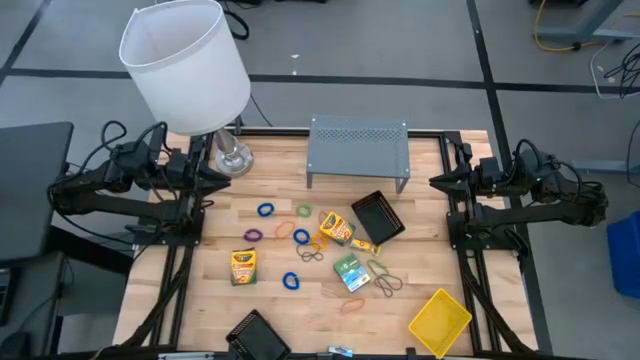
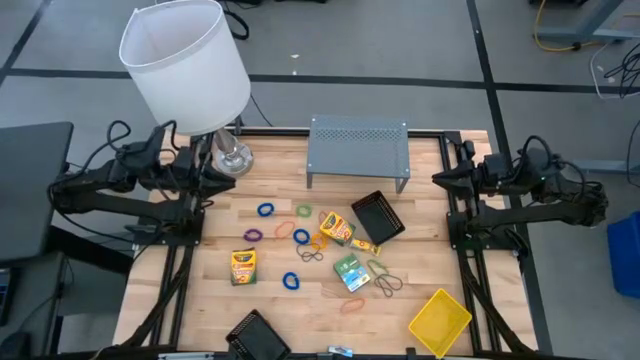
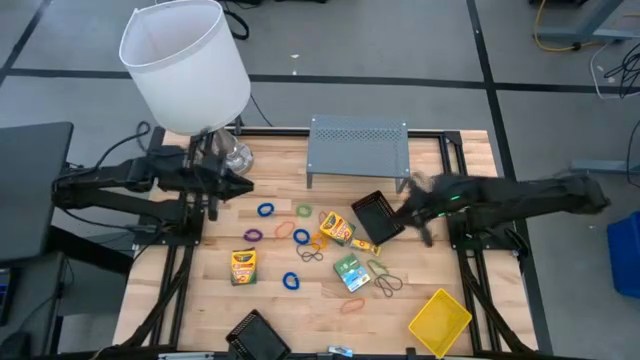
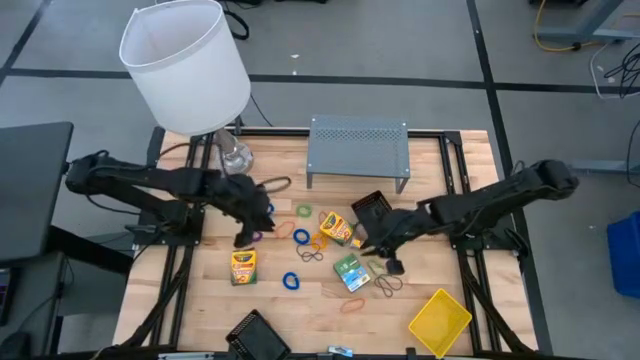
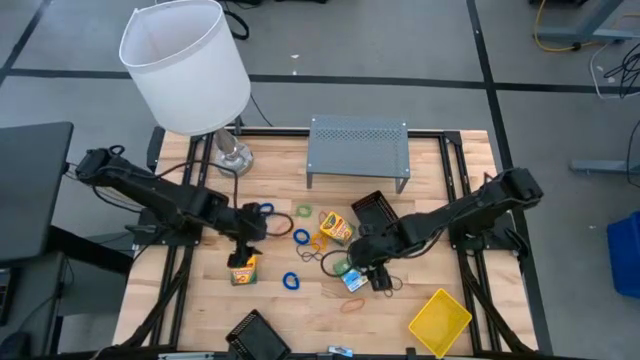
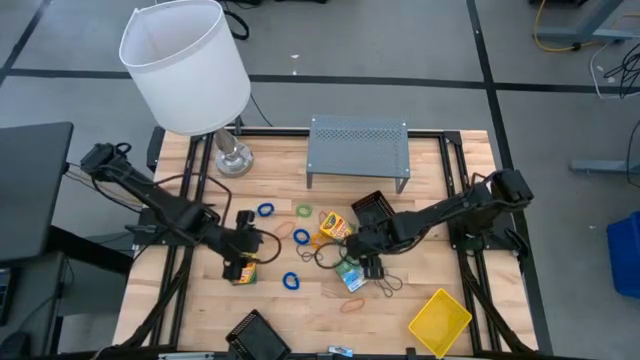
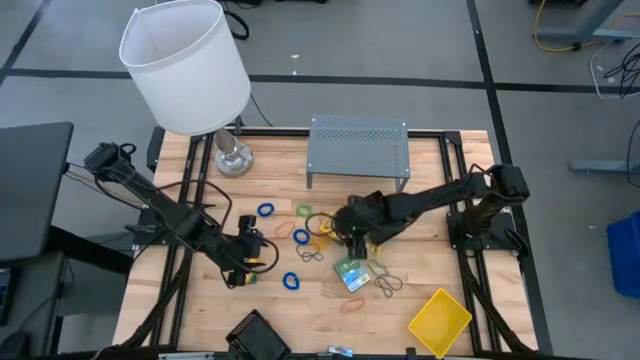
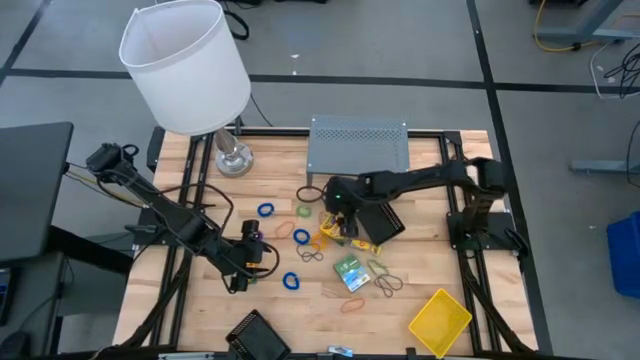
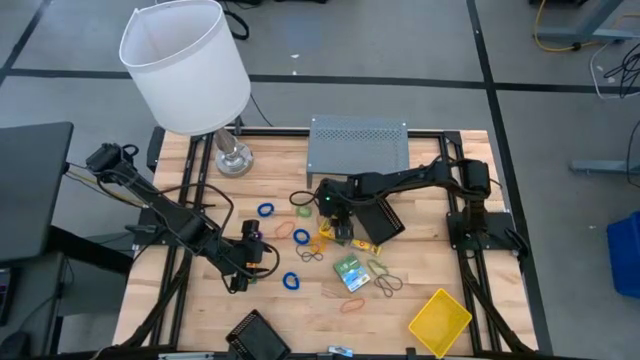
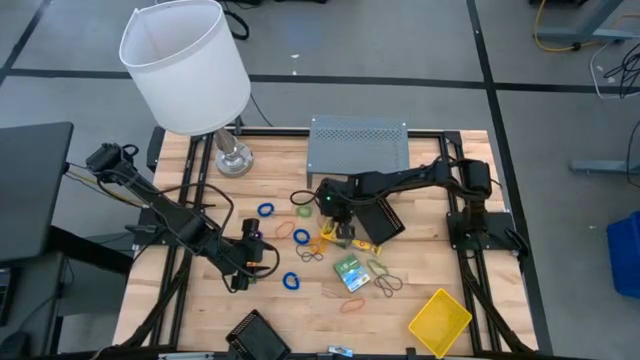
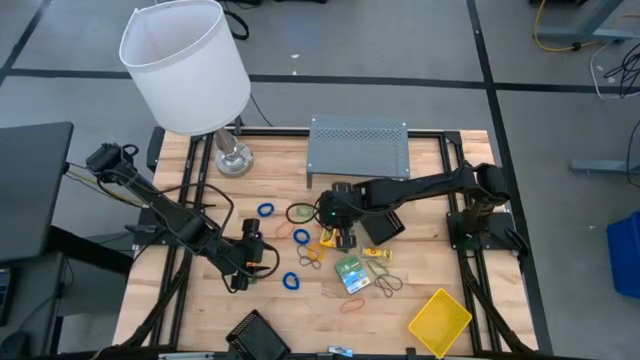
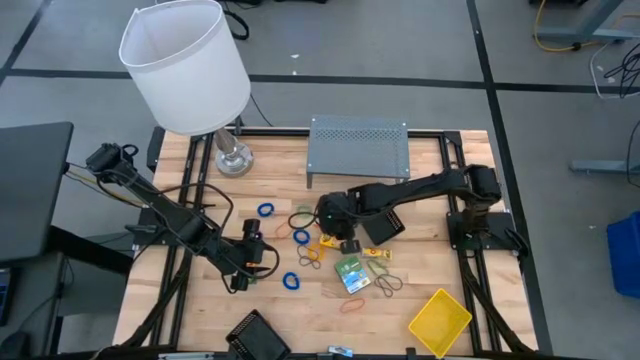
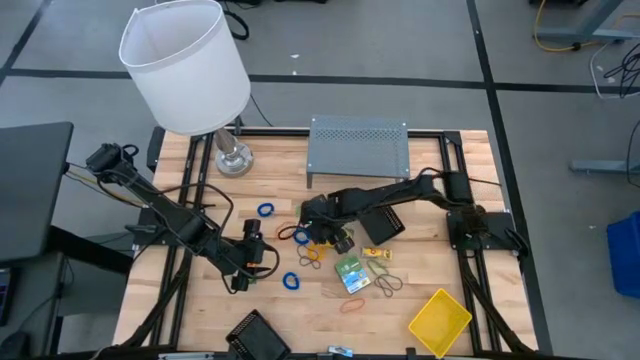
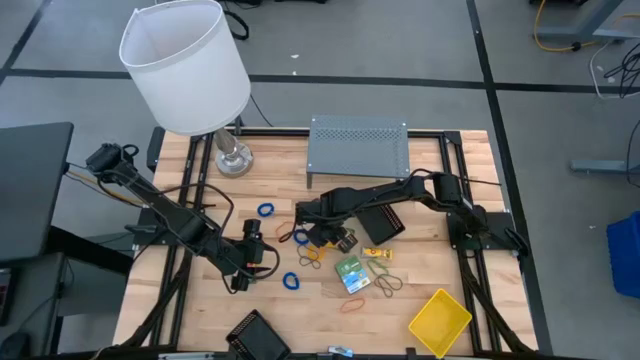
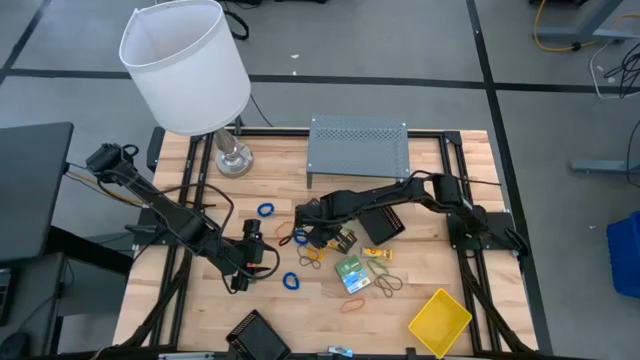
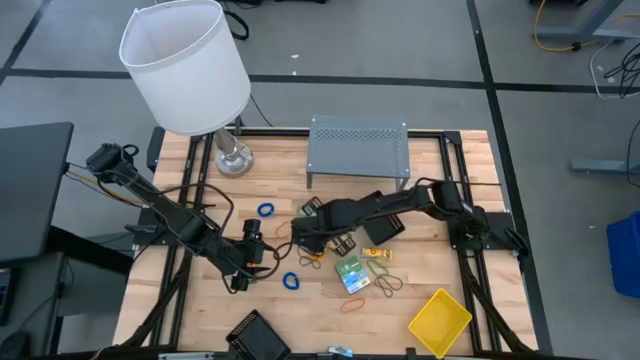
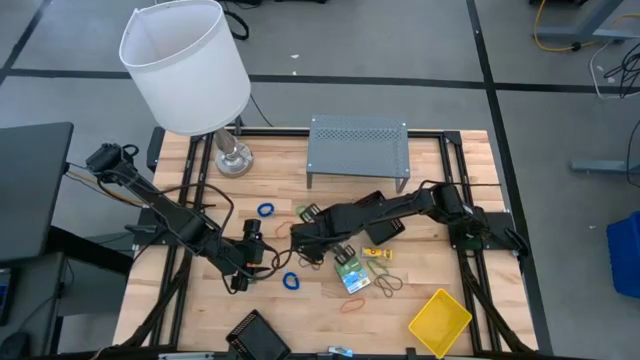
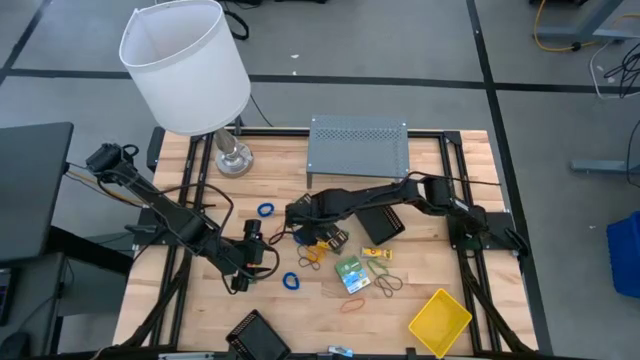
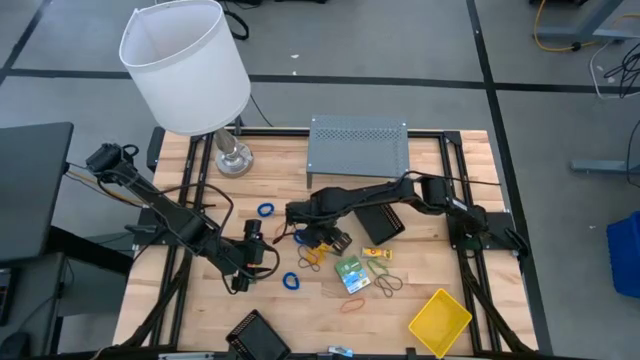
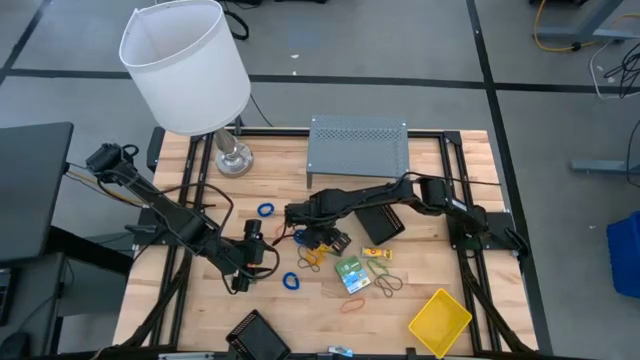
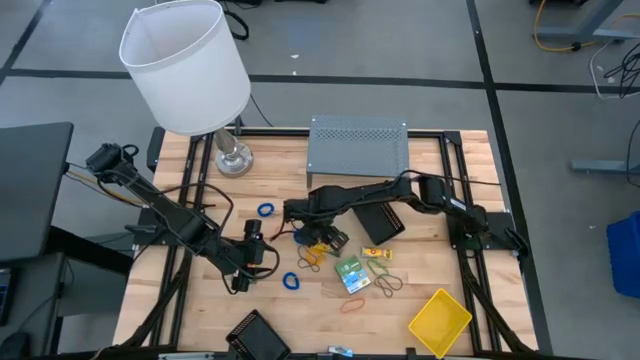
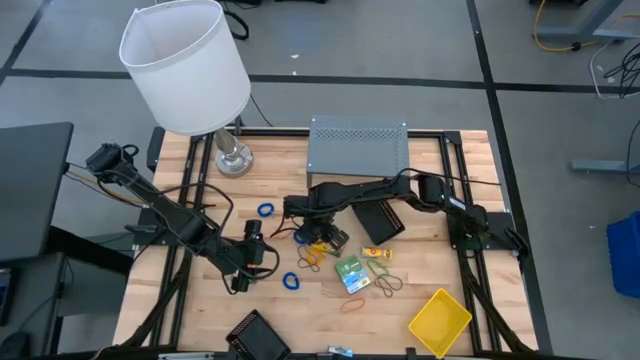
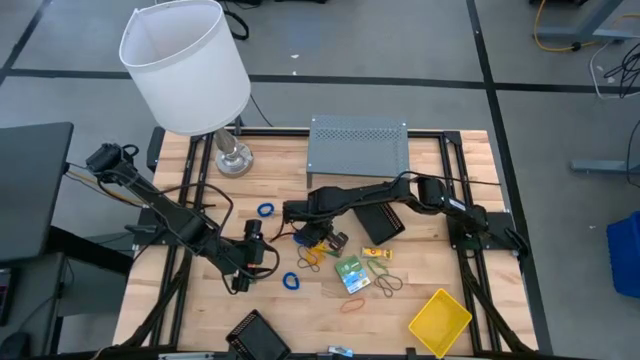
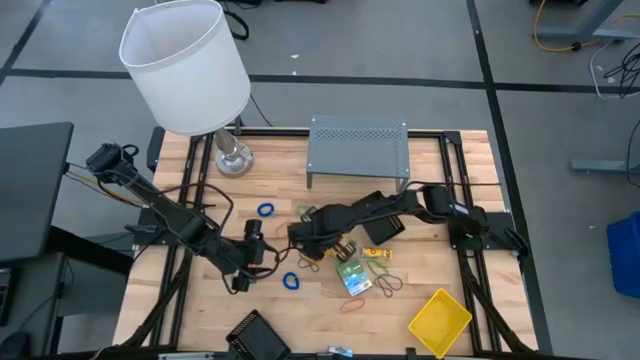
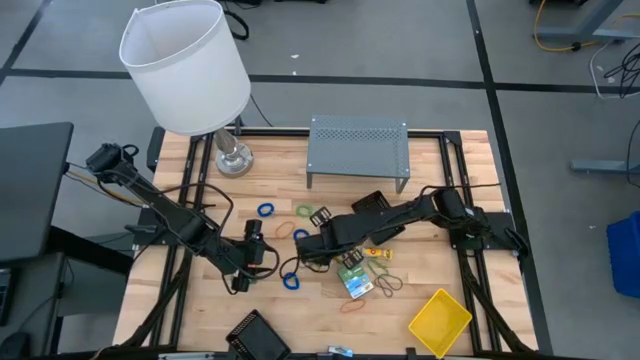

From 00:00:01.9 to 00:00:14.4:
Task: Pick & Place Office Desk Supplies
Put the yellow crayon box into the top black bin

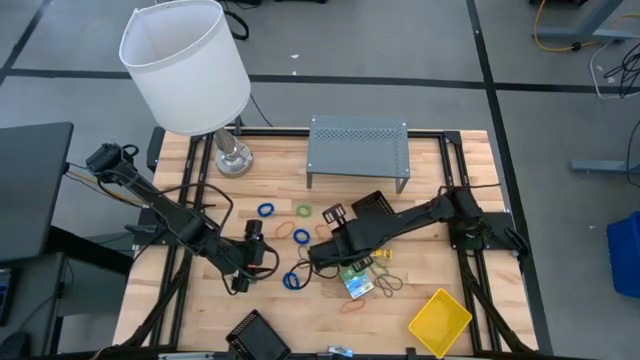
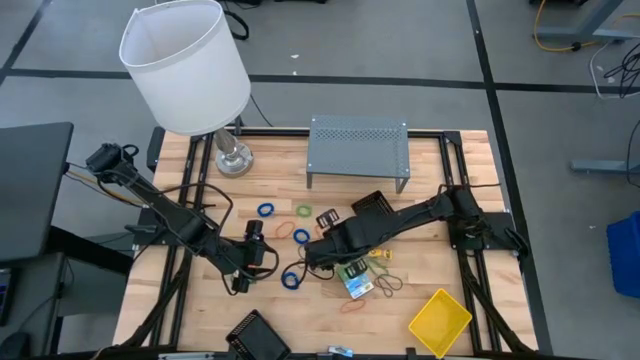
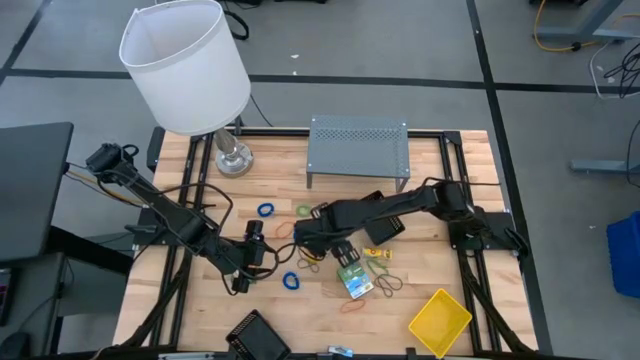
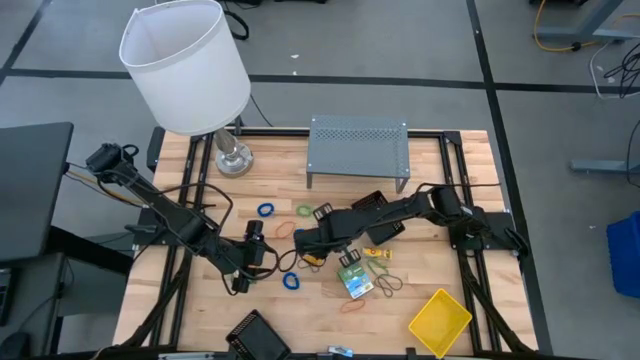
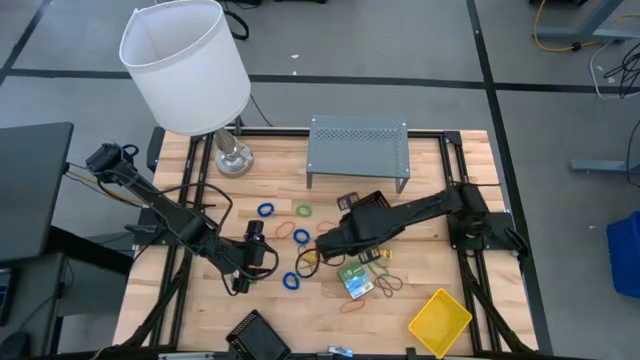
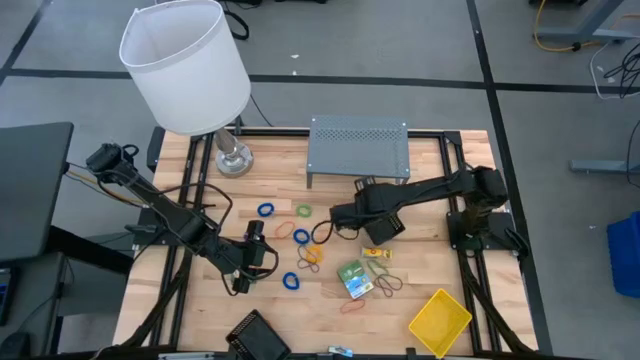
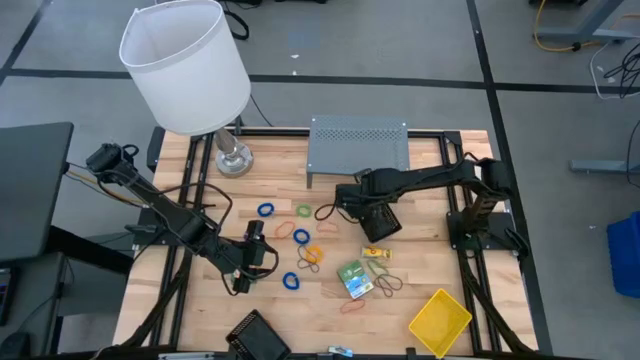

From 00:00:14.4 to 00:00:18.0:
Put the yellow crayon box into the top black bin

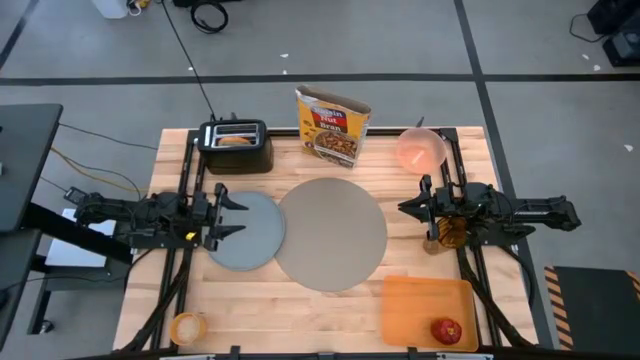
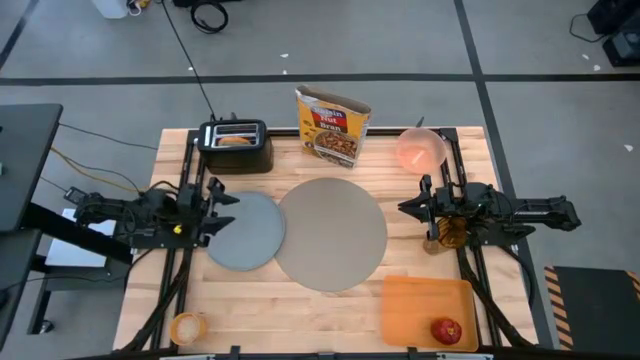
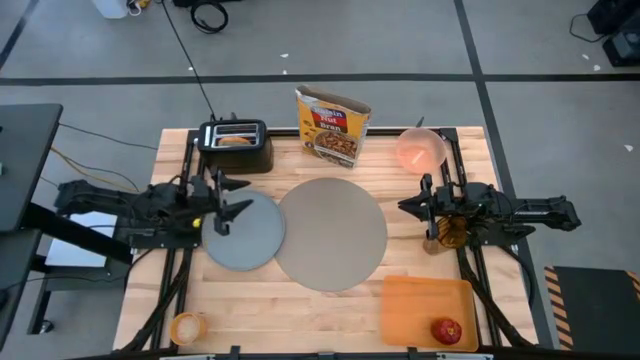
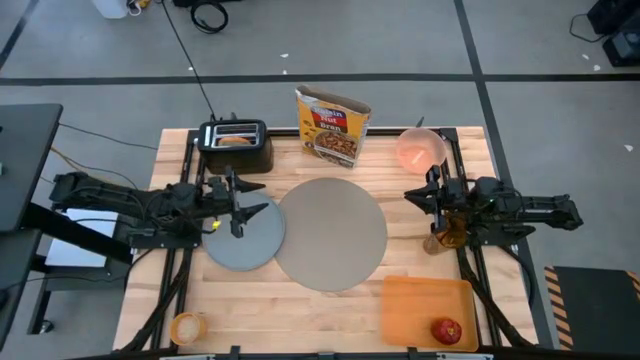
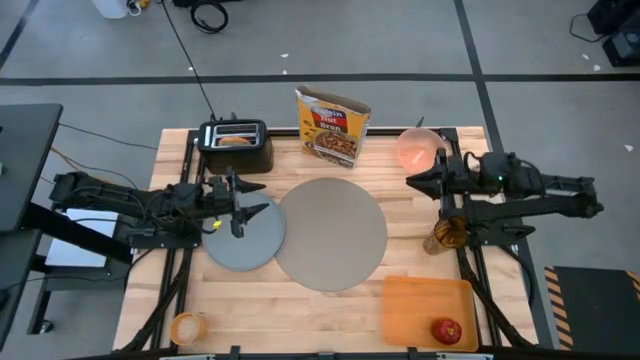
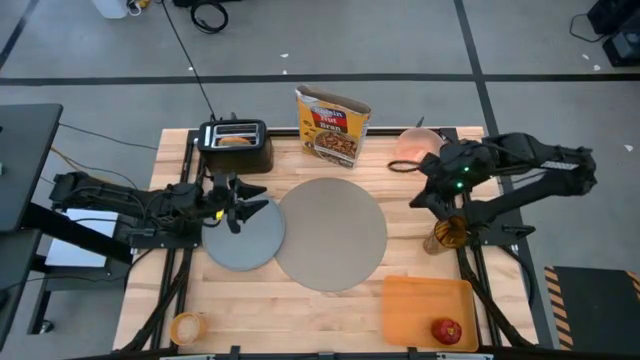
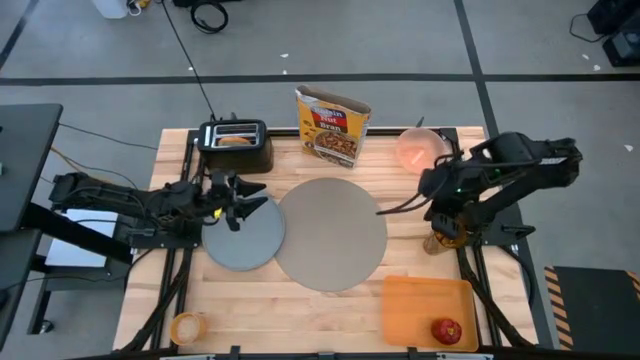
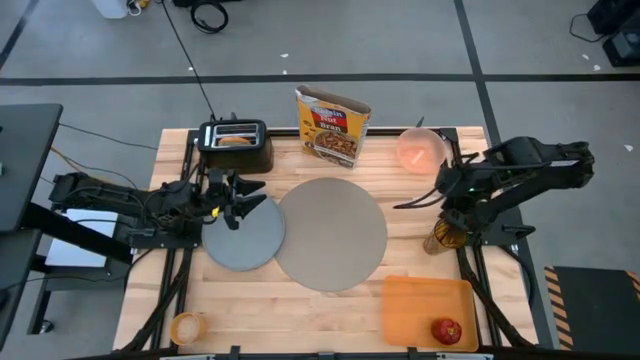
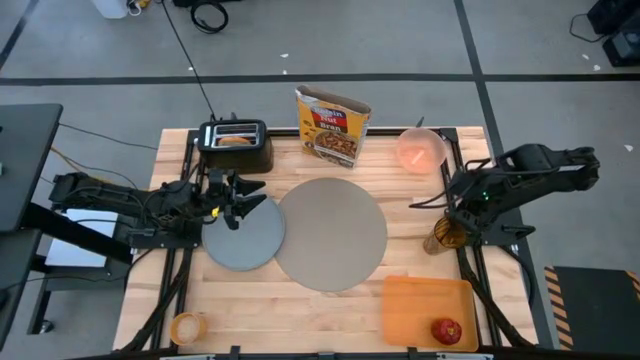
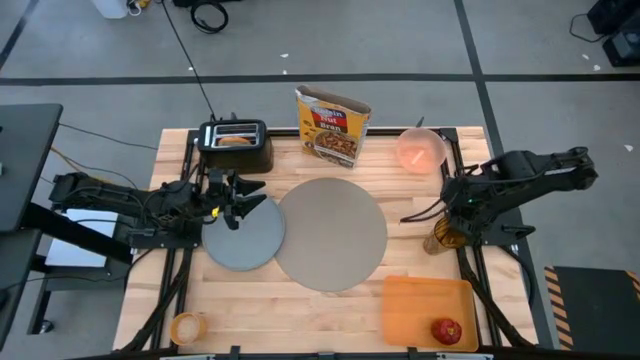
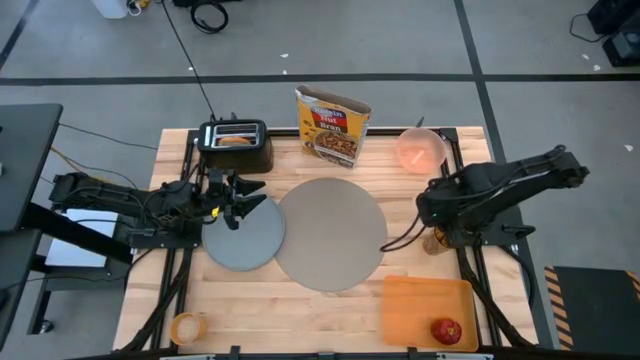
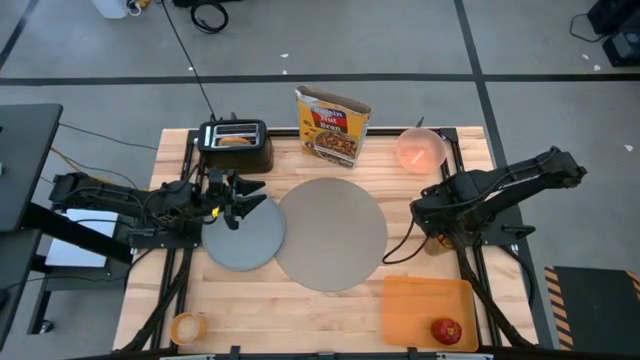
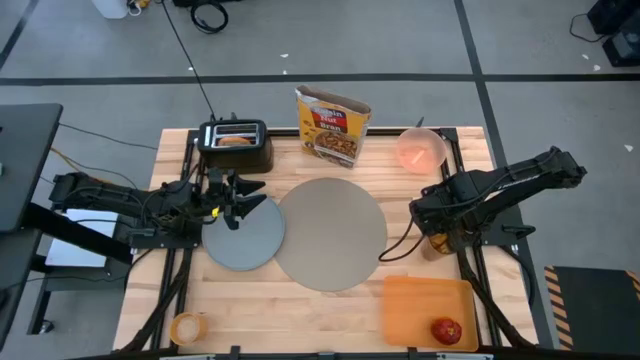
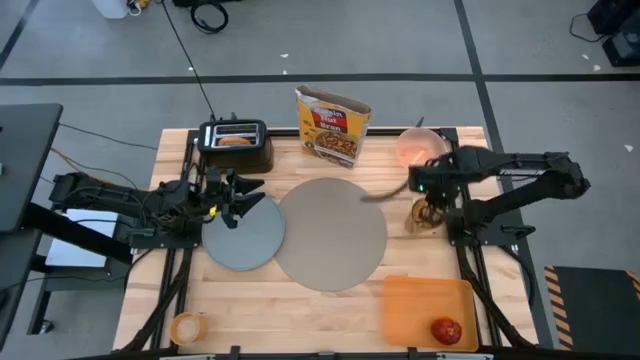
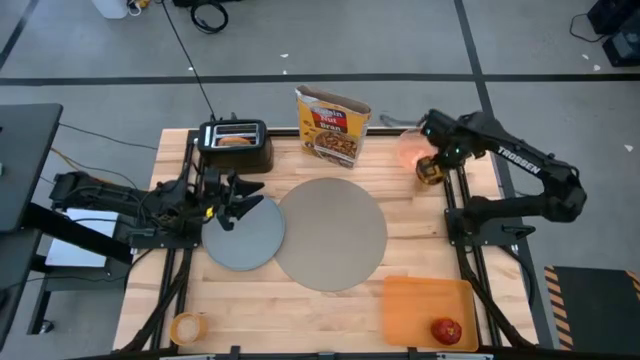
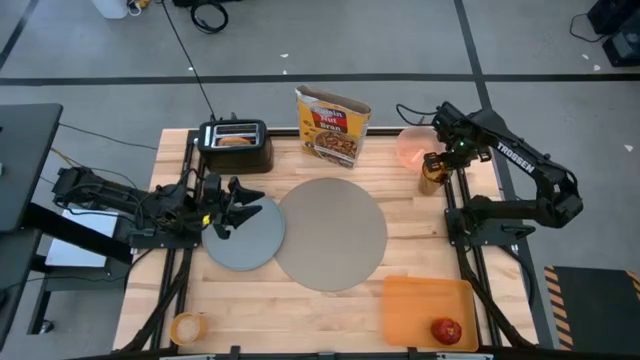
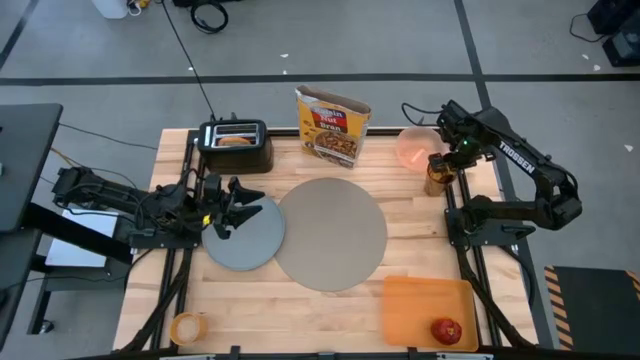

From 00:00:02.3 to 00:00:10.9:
Task: Arrange a breakfast setting
Move the brown glass to the top right of the table
